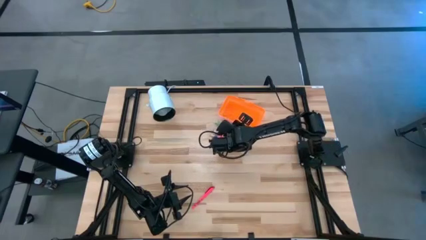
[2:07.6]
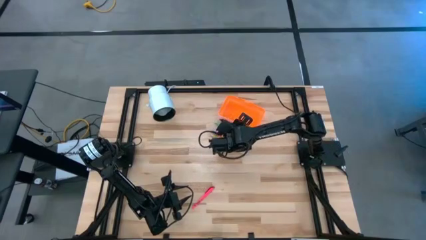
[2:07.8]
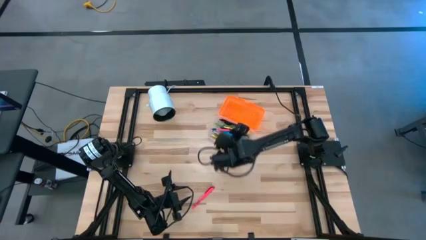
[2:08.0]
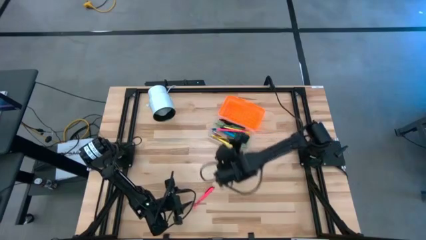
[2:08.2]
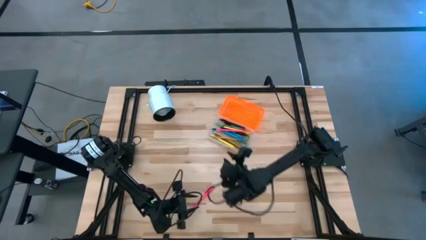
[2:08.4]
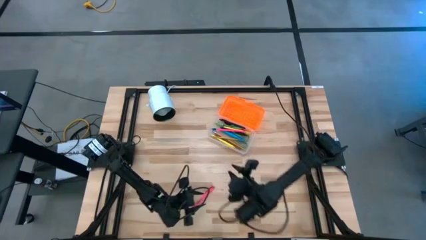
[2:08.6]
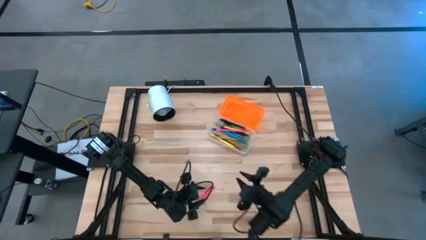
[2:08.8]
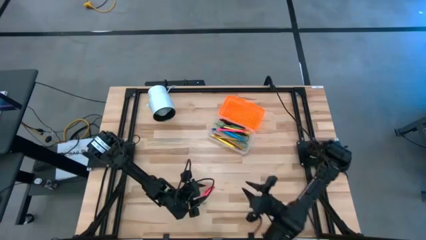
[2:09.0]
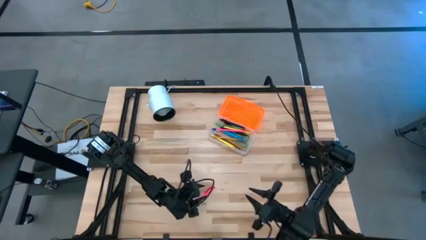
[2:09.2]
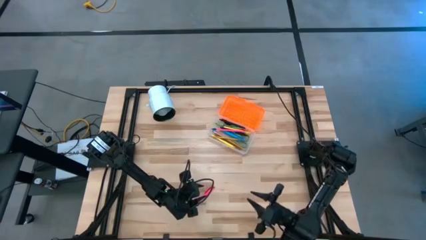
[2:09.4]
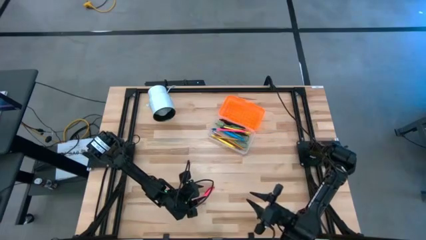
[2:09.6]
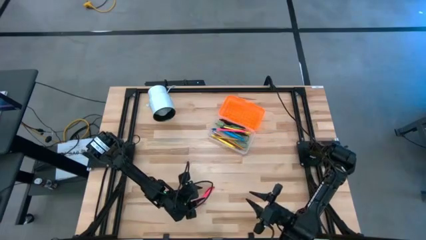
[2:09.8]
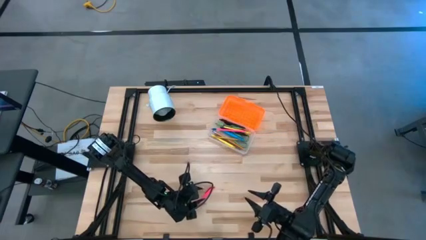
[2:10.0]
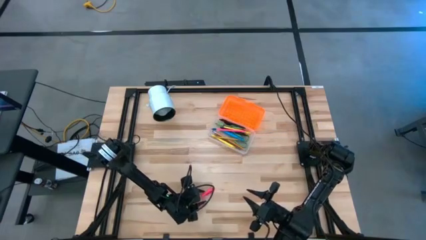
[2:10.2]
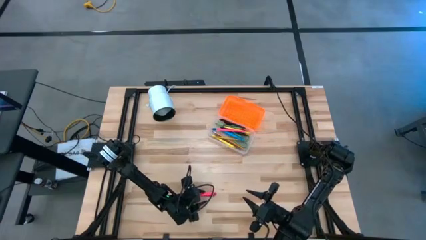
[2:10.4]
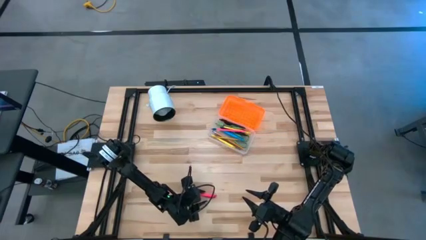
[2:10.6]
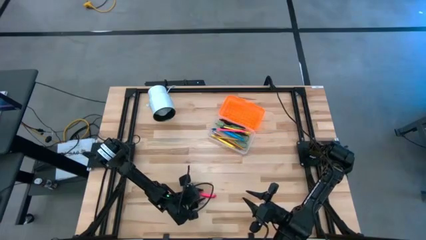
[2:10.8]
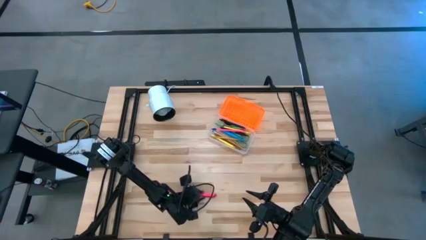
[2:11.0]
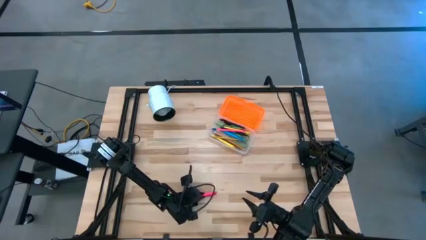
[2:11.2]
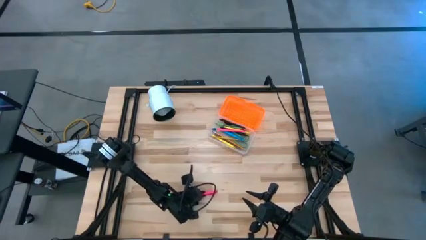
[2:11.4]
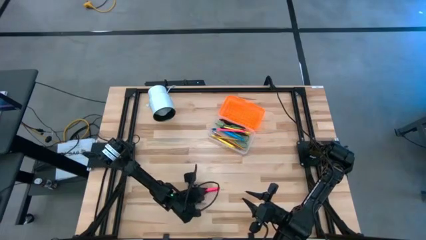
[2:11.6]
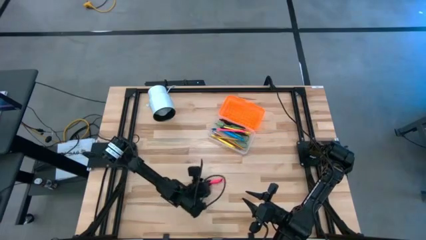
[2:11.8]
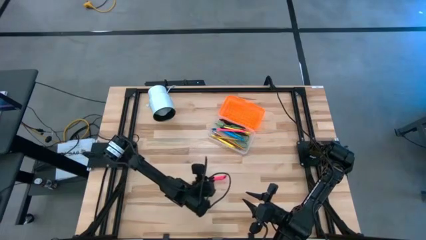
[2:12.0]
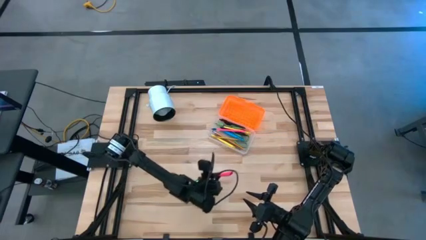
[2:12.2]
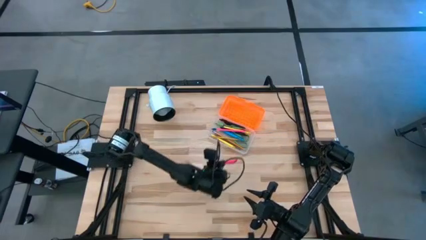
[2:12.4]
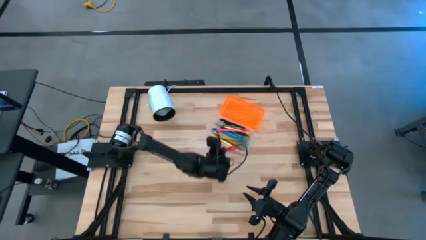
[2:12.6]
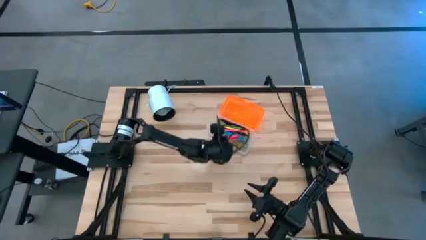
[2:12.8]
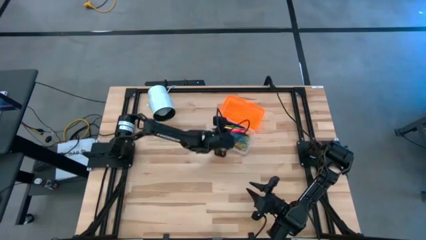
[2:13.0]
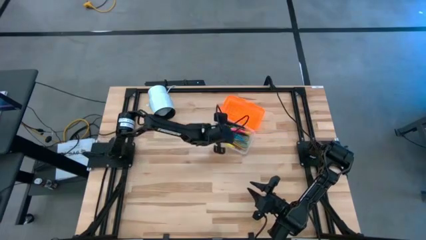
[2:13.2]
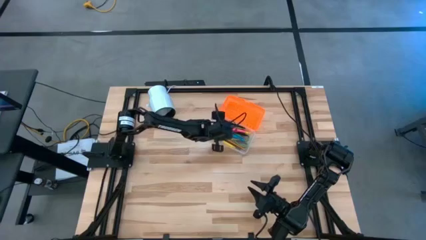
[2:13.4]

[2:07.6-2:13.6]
Task: Pick & place school supplies into a supply box
Put the pink pen into the supply box
